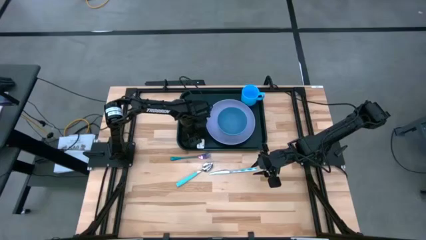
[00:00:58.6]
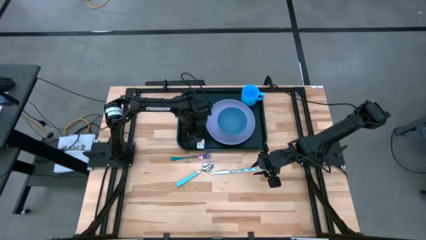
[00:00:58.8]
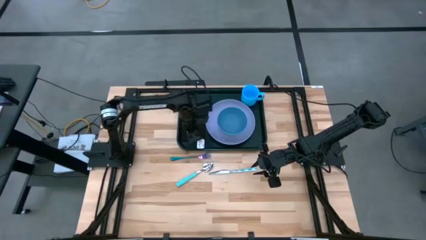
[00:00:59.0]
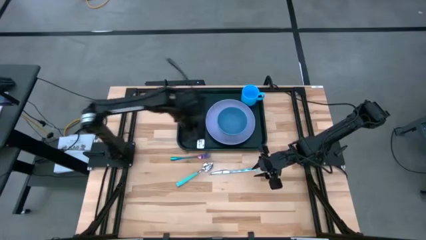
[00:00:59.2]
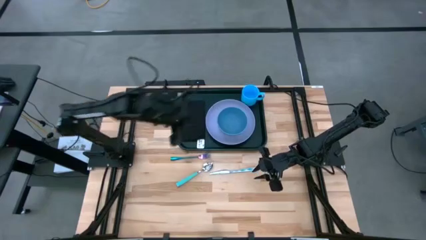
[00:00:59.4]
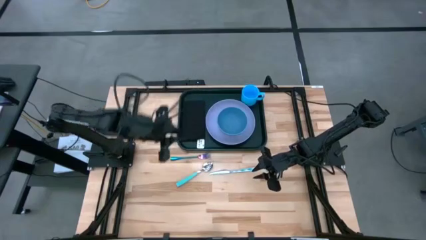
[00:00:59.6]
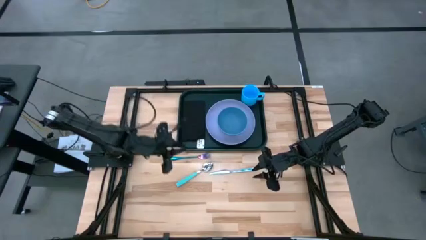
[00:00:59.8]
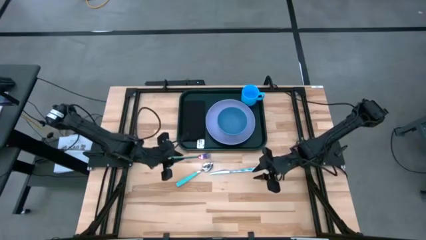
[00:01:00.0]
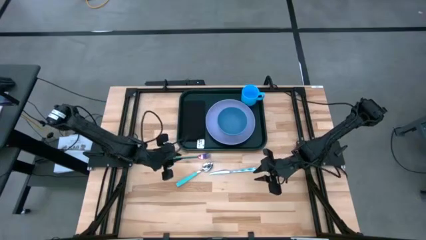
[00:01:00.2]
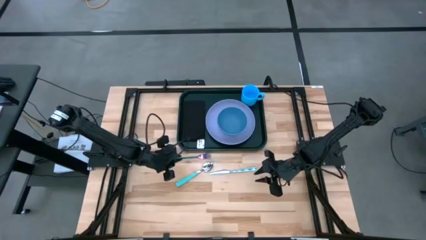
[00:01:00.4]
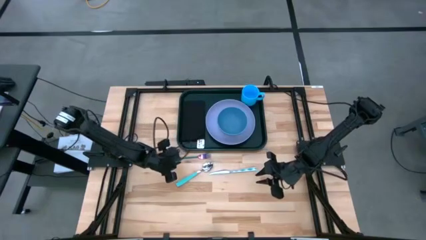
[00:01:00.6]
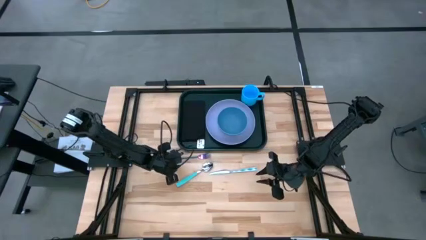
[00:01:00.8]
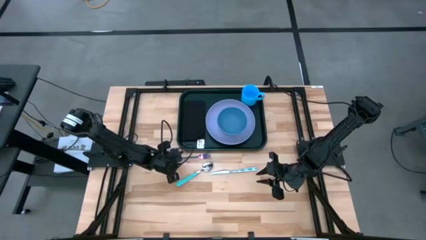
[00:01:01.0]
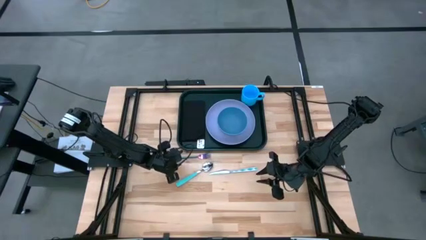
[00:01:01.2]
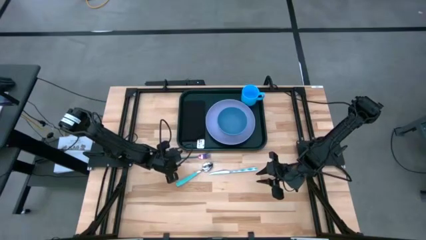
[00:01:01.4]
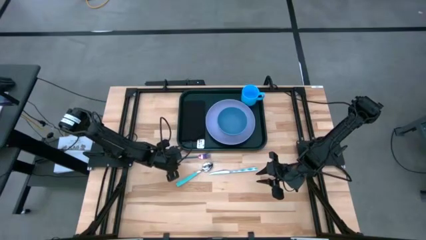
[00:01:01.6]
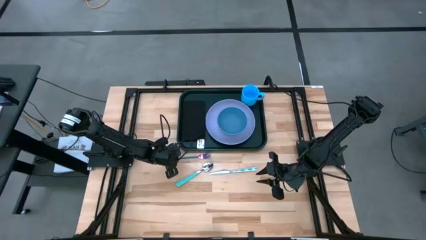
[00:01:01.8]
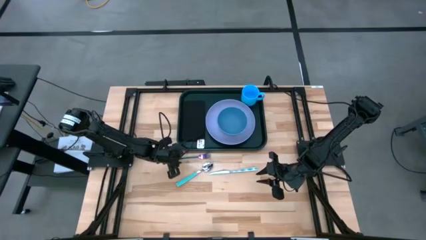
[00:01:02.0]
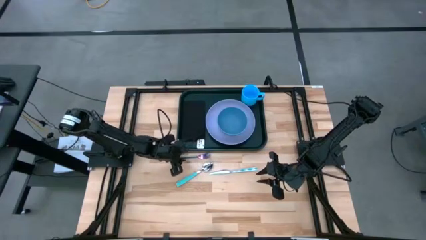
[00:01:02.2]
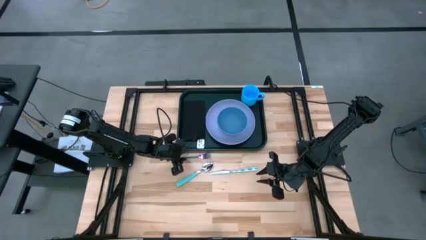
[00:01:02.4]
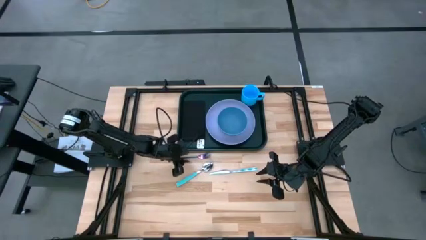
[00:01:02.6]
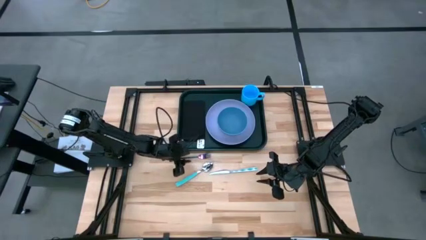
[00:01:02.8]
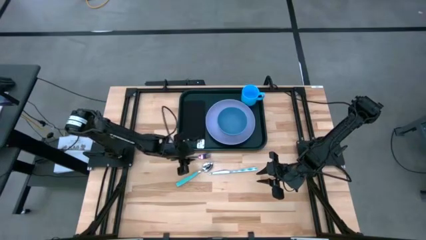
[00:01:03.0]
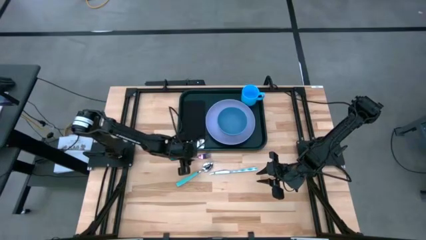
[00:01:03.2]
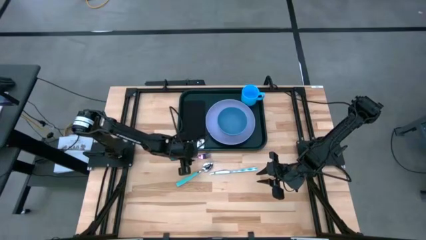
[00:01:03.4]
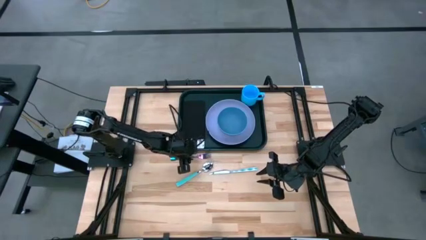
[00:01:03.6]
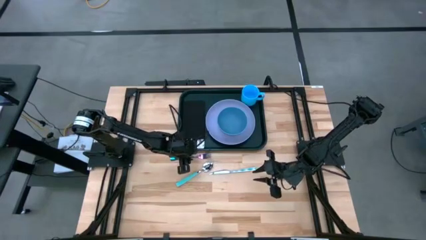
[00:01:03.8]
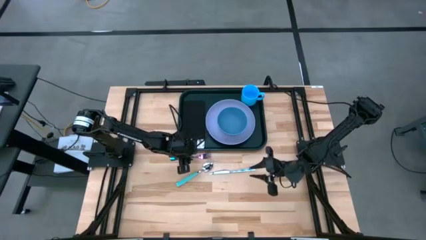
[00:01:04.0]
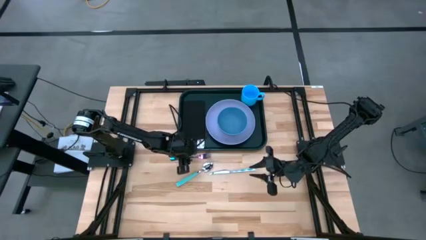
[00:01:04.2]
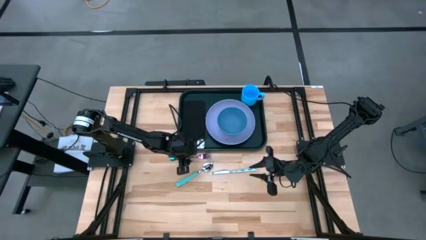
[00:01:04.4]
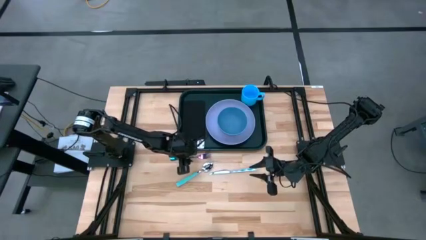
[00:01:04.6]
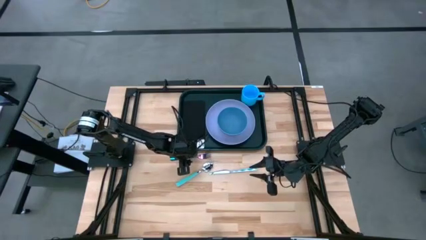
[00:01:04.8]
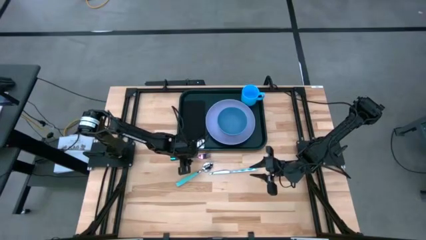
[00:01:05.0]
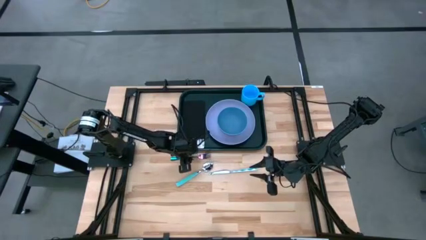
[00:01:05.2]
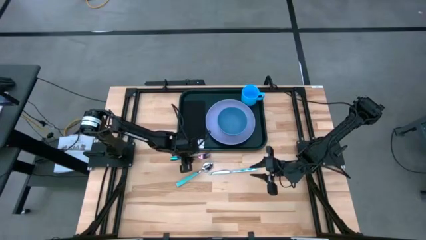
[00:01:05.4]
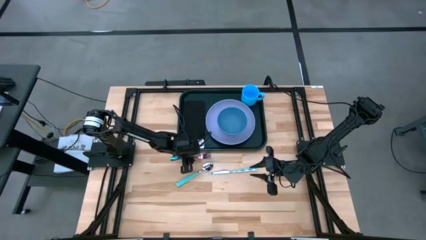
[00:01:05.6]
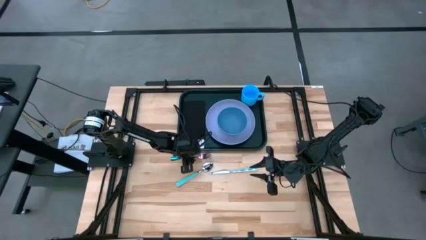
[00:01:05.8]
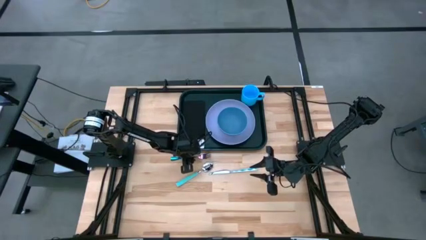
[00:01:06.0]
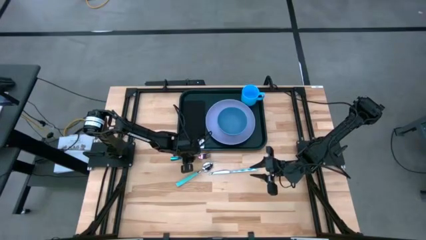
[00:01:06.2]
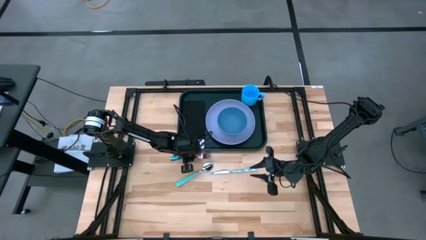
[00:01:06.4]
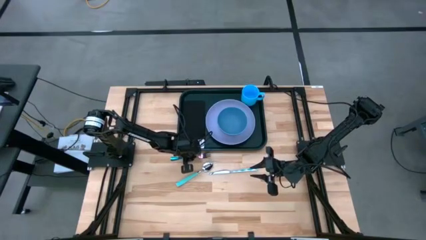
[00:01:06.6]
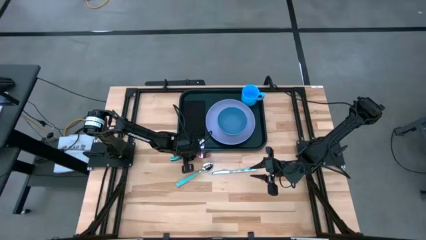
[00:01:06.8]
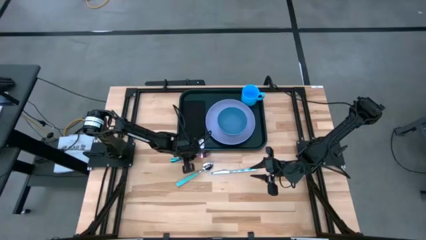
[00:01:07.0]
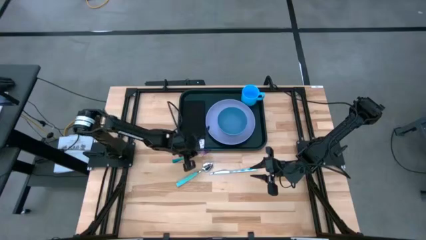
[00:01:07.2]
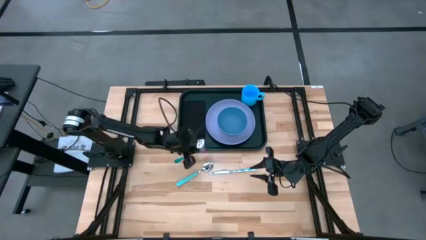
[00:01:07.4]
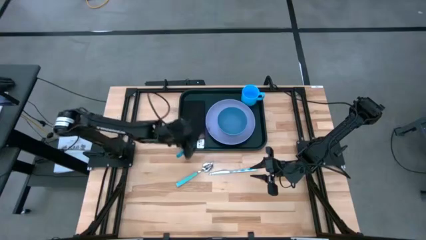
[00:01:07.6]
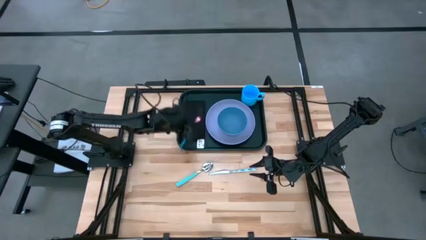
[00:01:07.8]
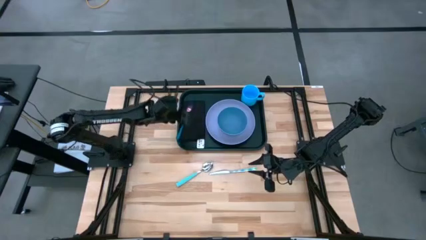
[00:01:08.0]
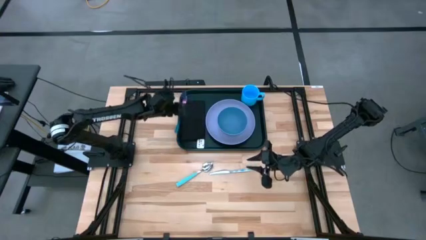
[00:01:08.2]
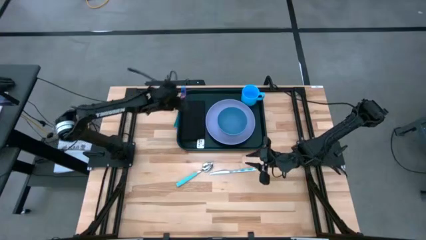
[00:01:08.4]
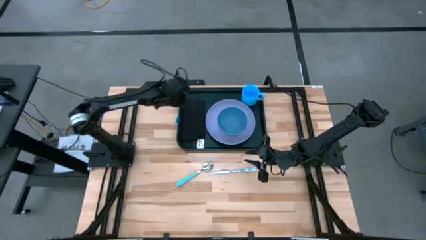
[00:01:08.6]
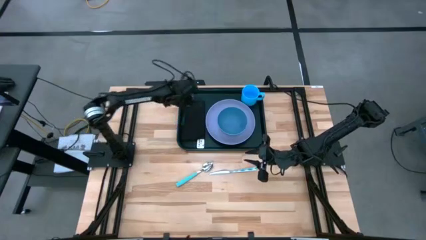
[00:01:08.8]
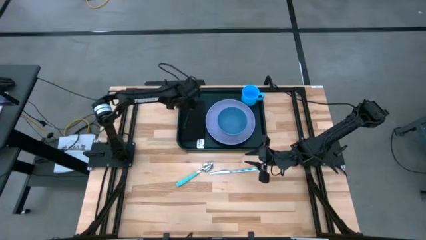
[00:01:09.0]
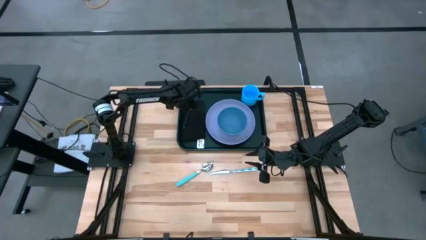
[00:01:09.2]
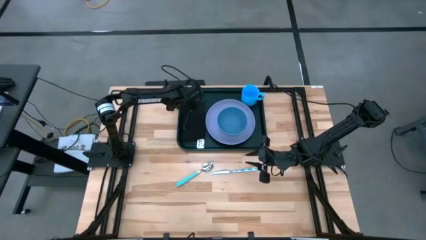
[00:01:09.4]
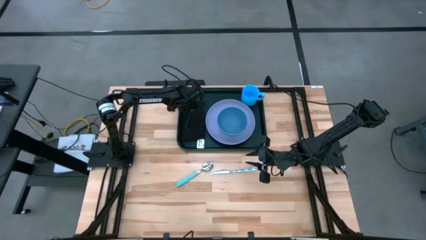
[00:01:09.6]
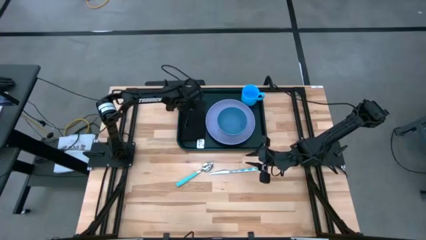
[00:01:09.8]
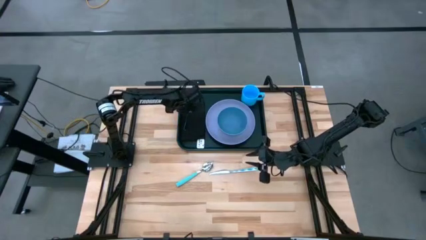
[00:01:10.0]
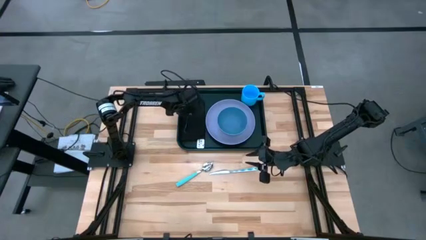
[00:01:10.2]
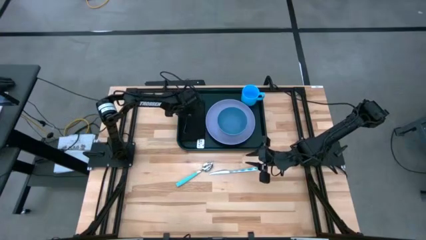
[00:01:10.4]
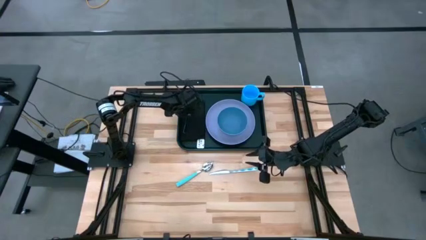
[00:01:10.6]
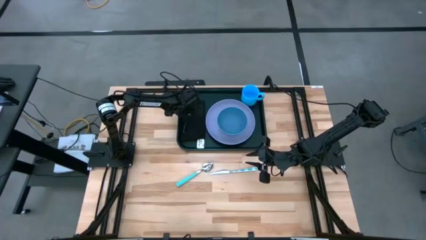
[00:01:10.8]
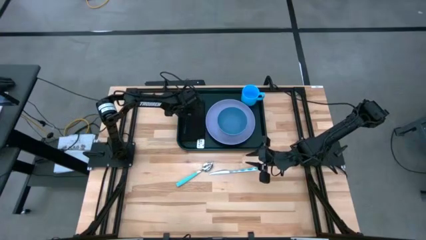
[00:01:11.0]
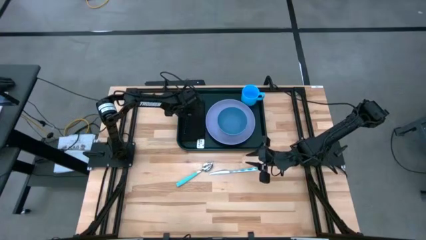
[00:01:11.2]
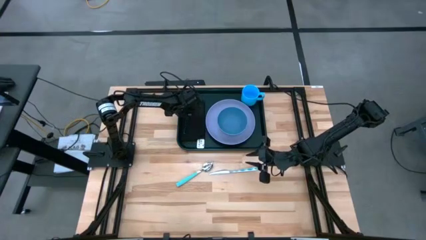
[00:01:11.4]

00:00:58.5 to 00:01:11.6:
Task: Set up tray
Put the blue fork on top of the napkin on the black serving tray

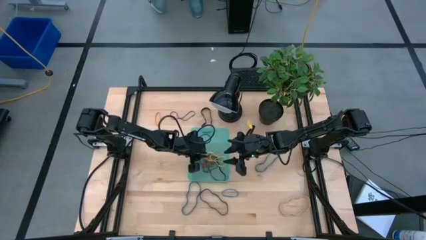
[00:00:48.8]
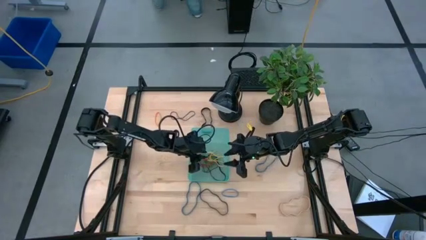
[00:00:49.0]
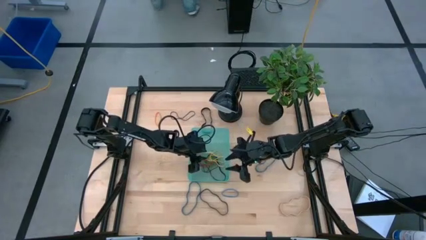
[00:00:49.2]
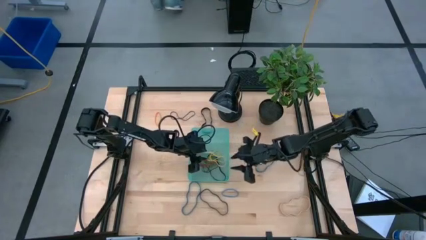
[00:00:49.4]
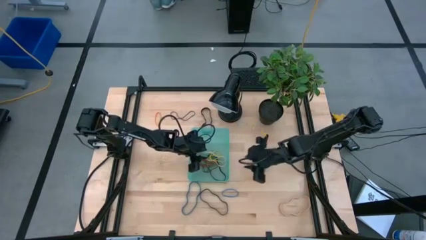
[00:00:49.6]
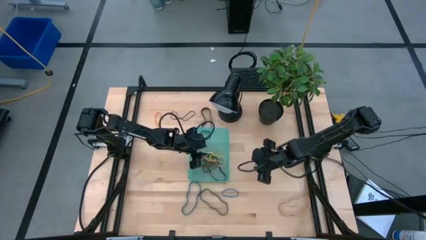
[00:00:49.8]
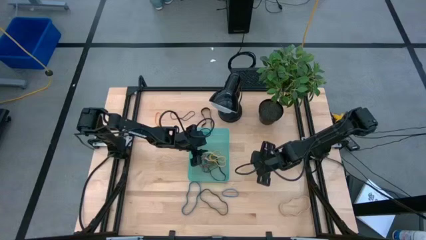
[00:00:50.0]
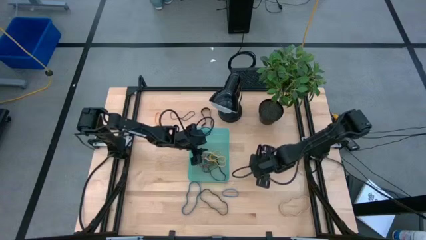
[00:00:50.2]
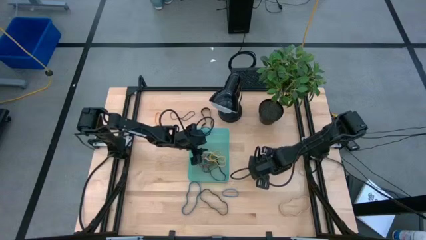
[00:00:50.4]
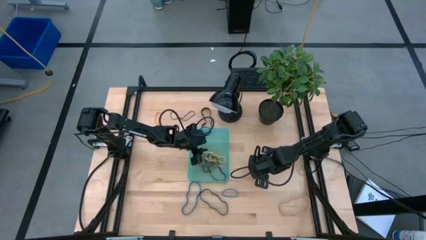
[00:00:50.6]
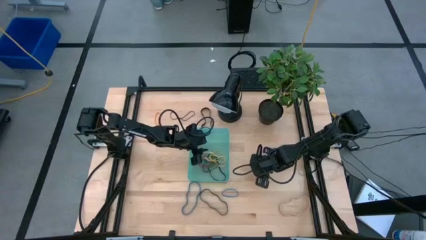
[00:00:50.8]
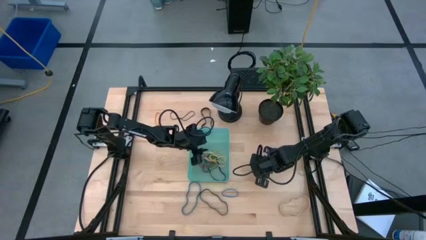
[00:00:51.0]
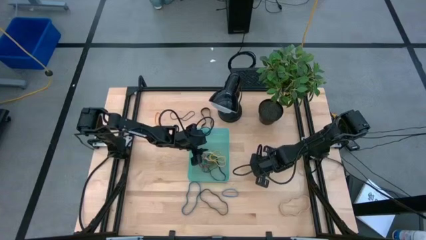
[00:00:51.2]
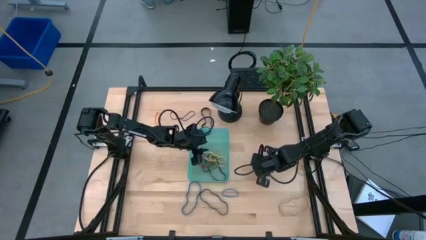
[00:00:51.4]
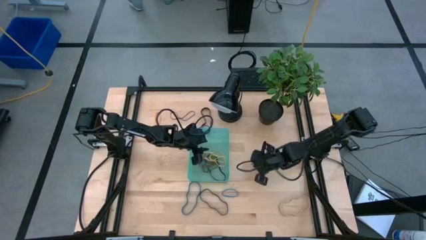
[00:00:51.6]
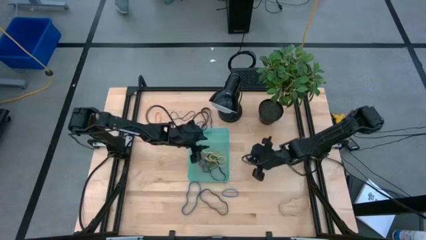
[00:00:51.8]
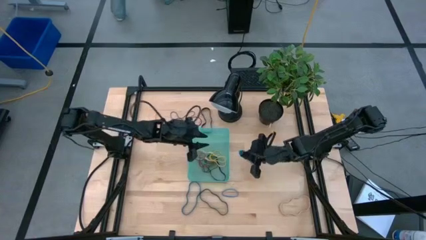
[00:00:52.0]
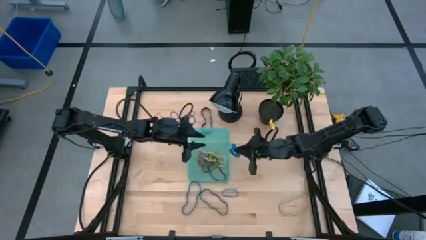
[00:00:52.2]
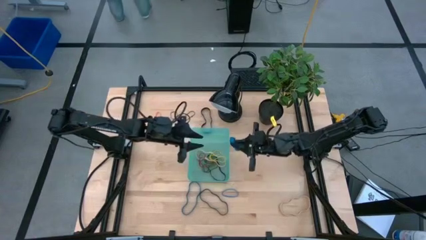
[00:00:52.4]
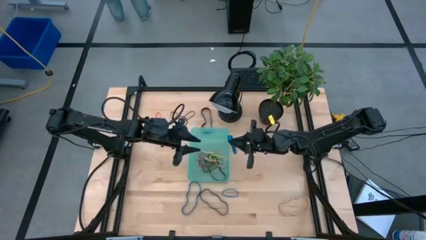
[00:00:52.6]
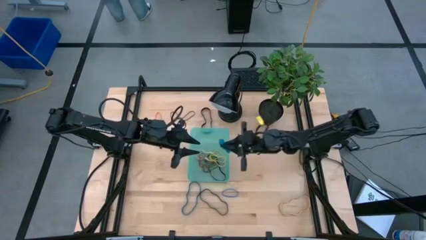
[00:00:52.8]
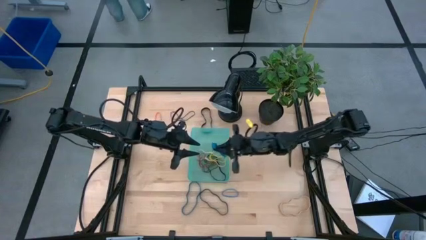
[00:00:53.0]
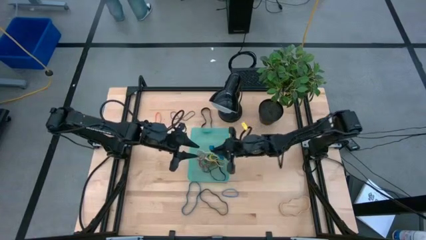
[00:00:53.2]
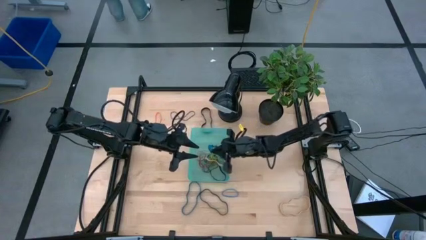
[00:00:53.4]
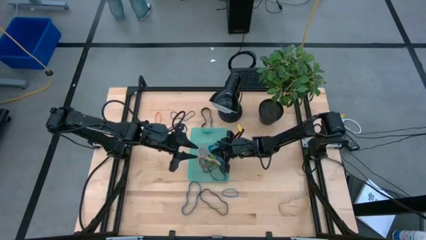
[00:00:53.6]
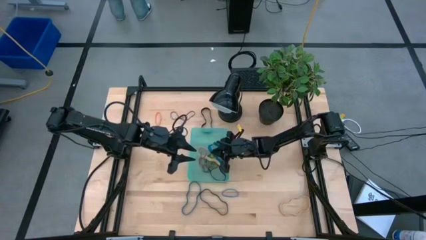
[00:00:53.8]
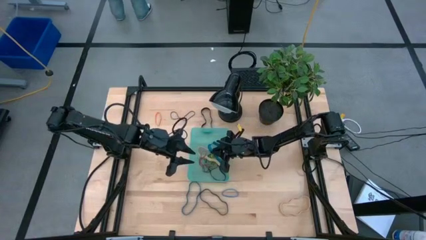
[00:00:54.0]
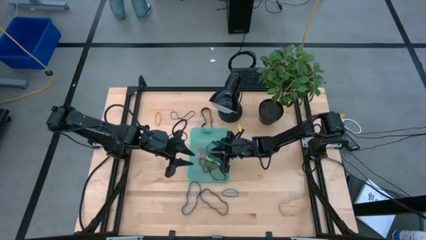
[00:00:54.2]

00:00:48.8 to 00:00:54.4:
Task: Pick and place rubber bands into bin
Put the top blue rubber band into the basket
